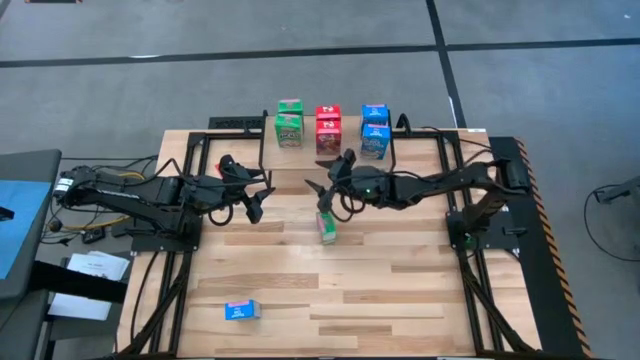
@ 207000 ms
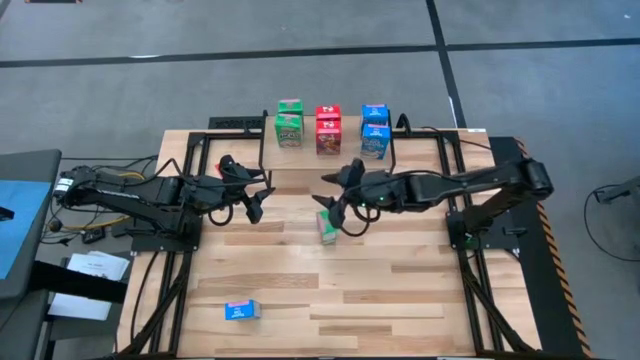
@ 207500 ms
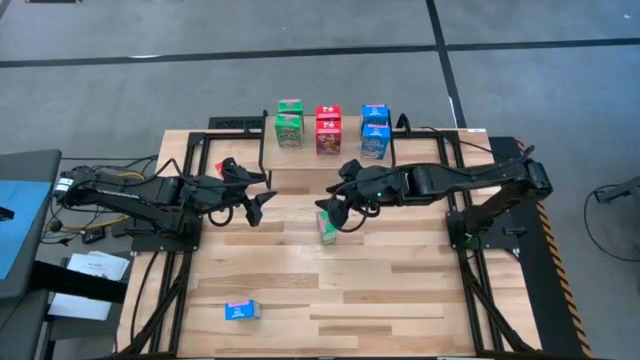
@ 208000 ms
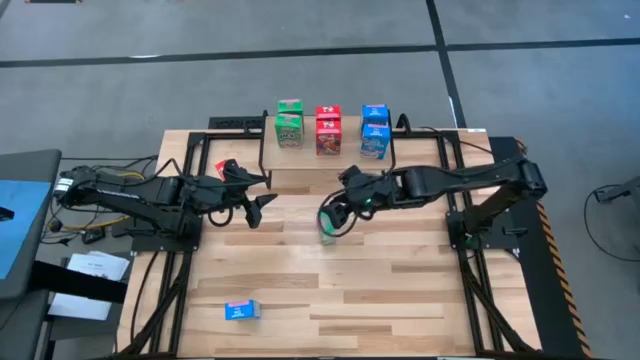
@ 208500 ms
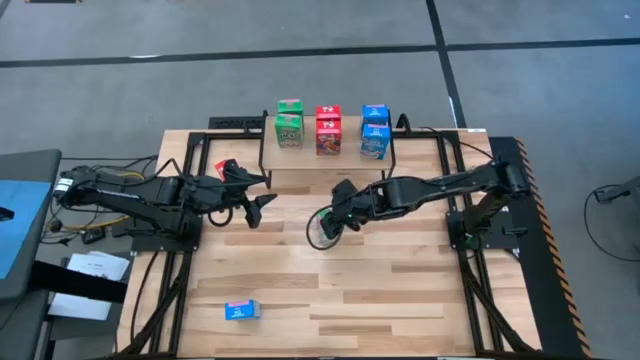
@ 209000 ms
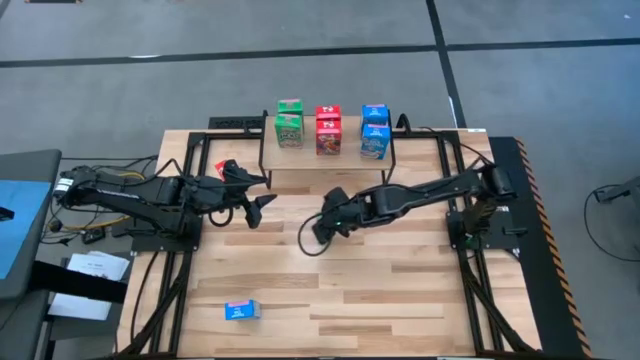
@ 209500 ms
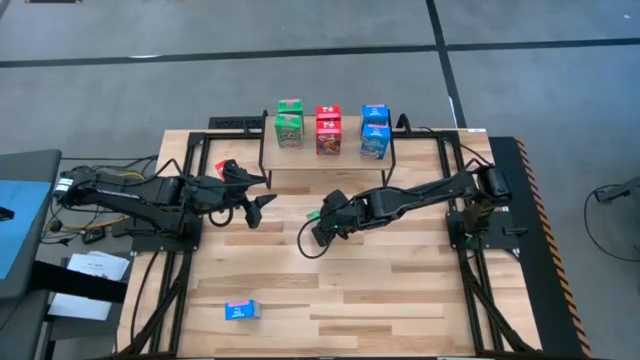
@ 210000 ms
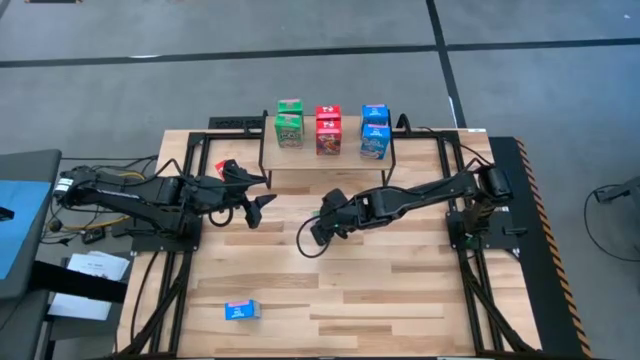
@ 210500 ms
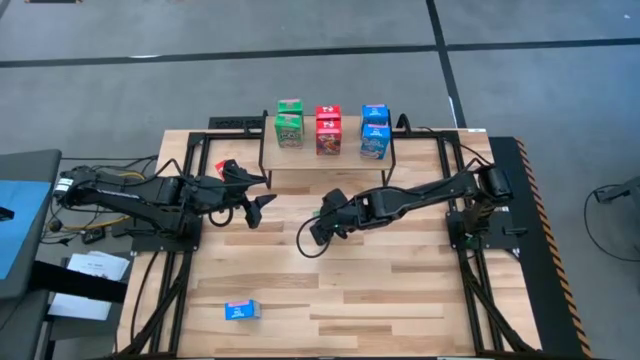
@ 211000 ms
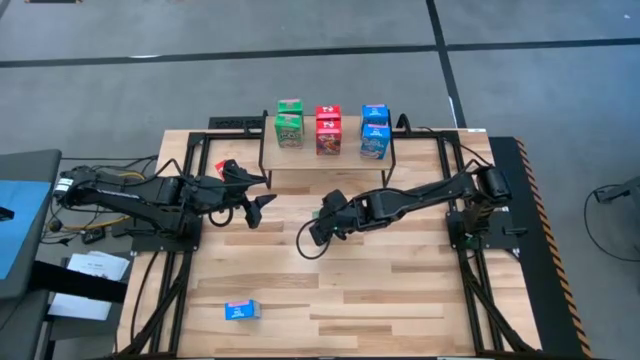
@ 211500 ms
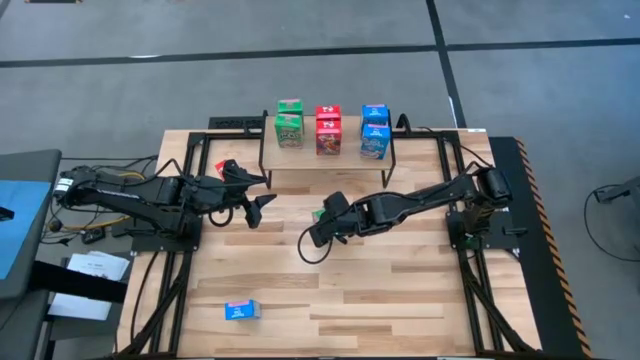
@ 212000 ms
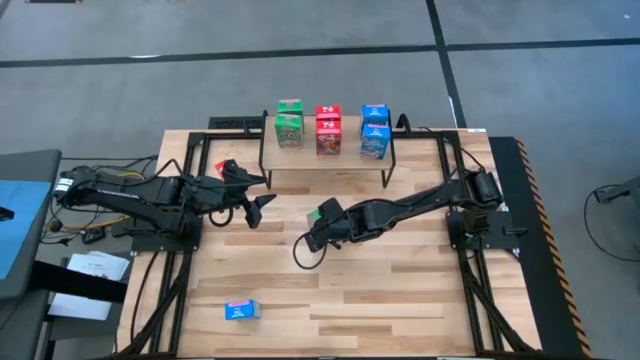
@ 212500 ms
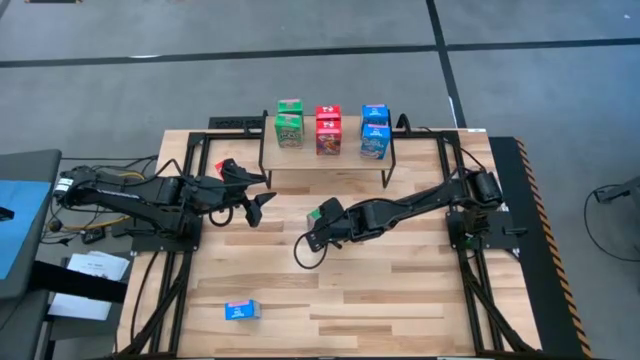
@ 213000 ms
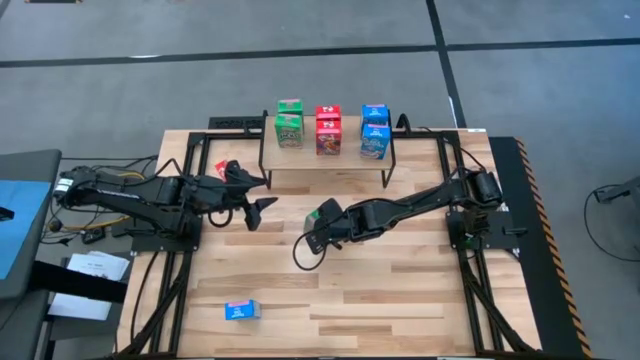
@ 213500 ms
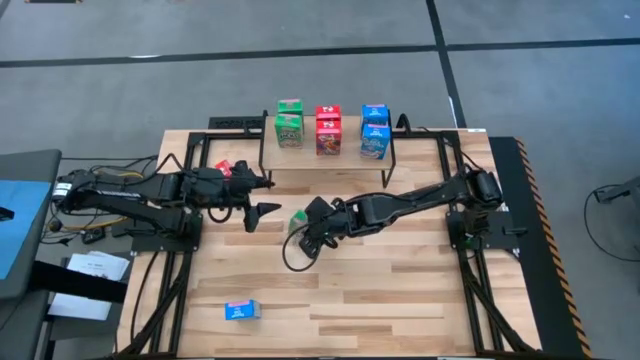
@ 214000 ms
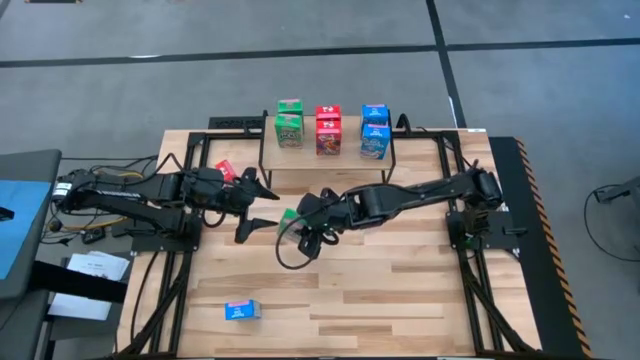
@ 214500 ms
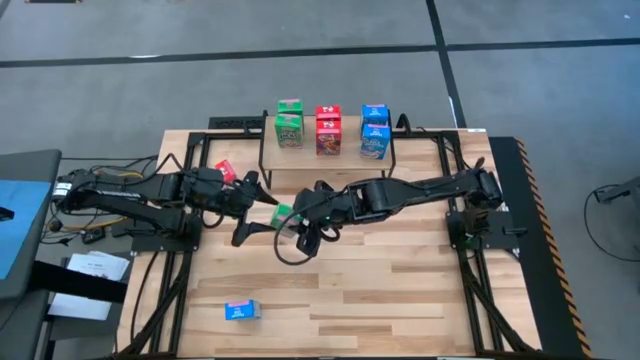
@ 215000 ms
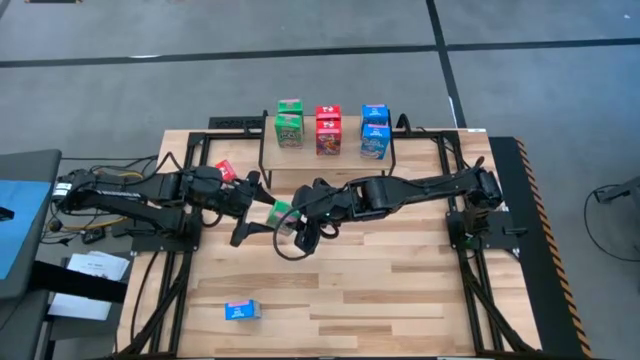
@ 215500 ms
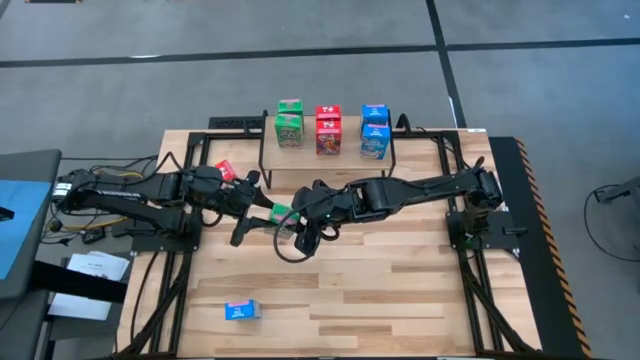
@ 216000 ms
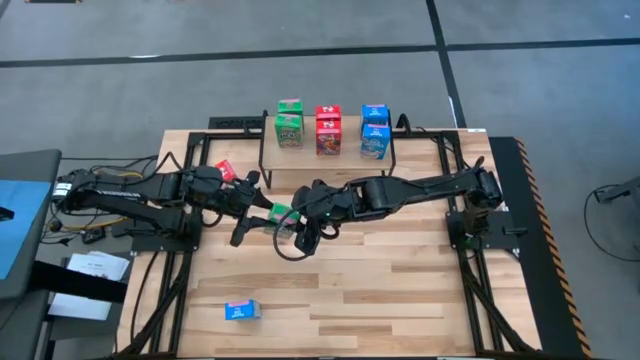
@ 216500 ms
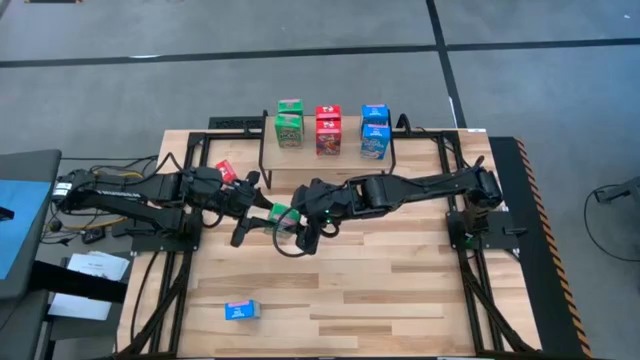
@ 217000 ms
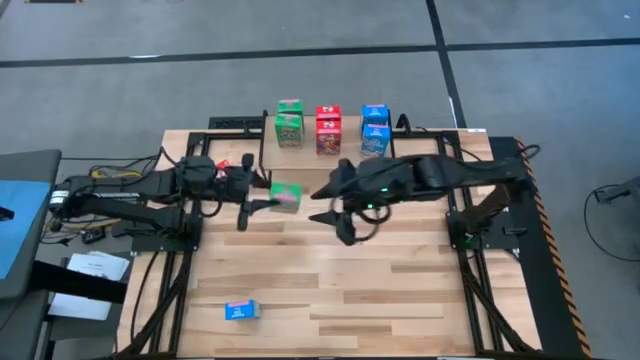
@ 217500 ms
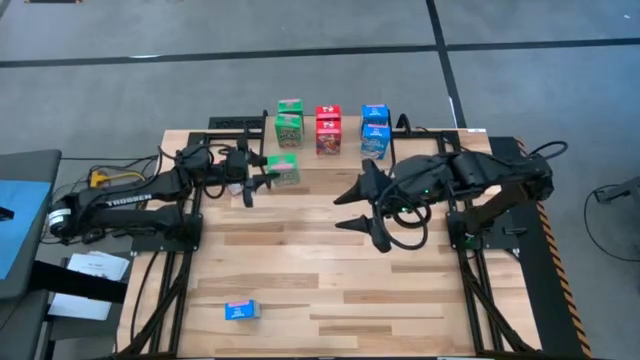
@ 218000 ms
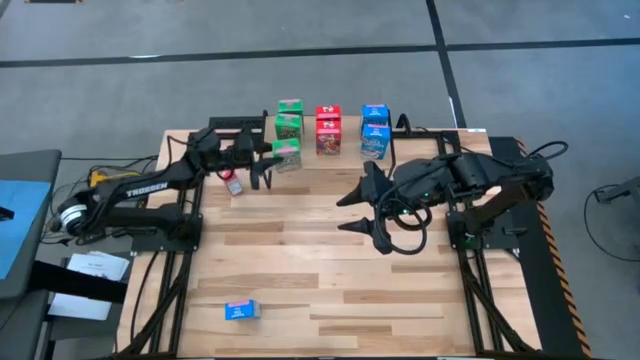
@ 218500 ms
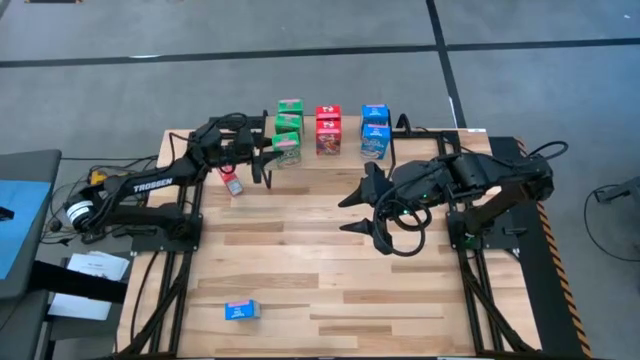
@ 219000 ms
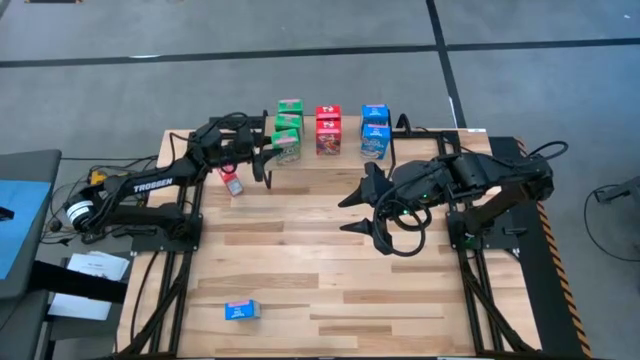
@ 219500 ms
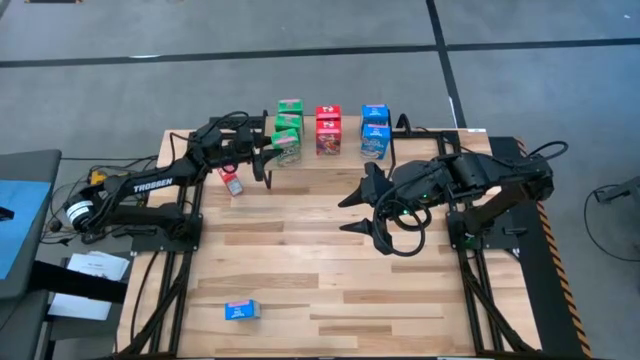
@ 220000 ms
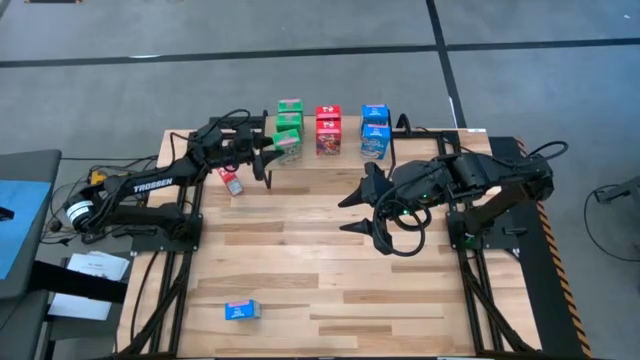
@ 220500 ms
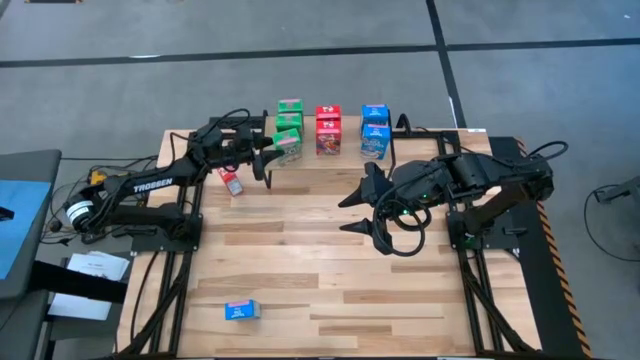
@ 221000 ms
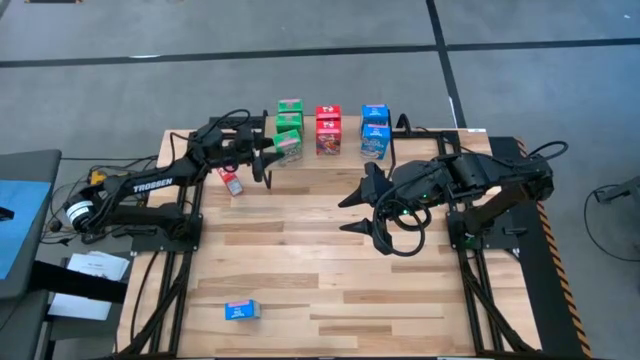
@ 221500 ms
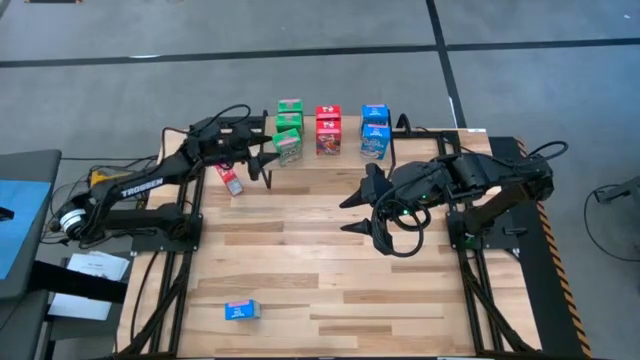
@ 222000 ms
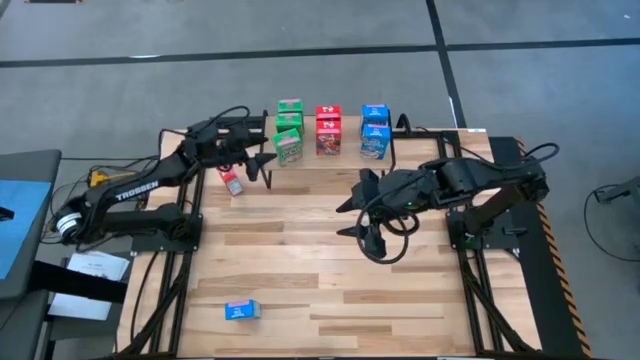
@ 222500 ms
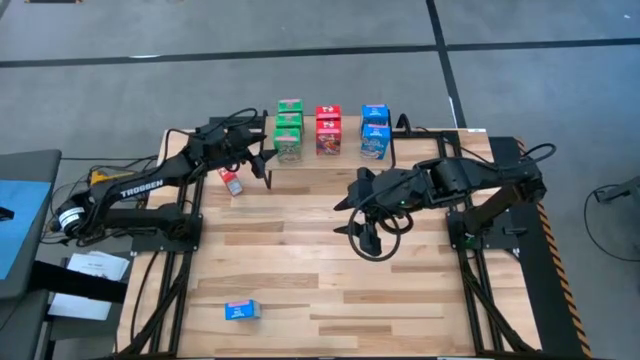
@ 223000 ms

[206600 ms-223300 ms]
Task: Stack cereal on shelf
Put the green cereal box on the shelf aligned with the other green cereal boxes

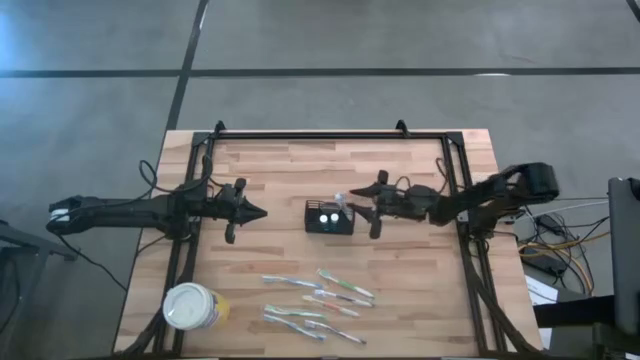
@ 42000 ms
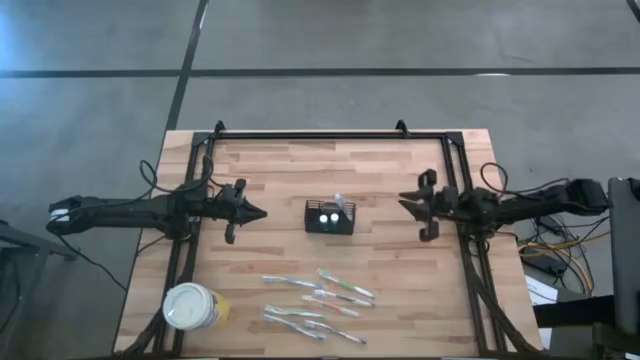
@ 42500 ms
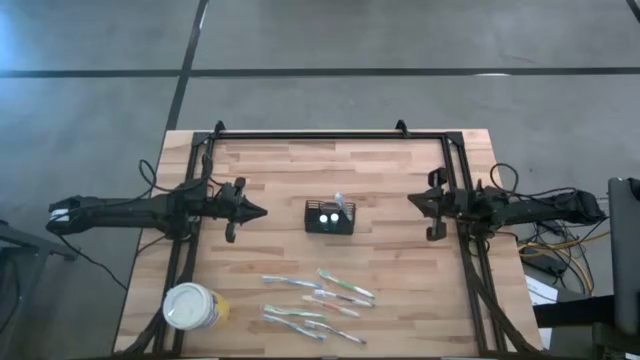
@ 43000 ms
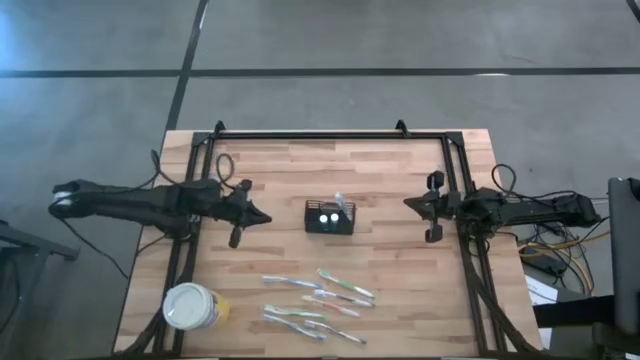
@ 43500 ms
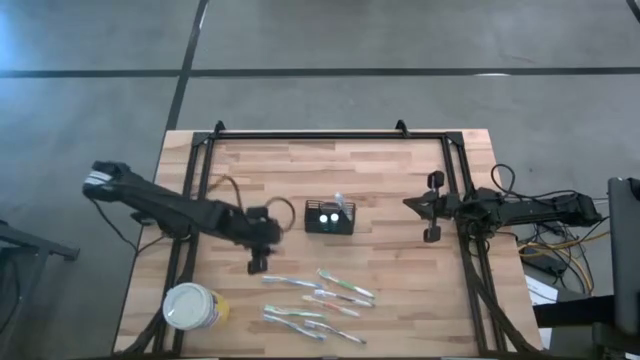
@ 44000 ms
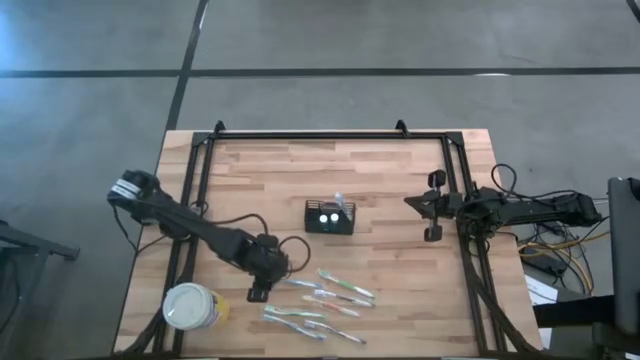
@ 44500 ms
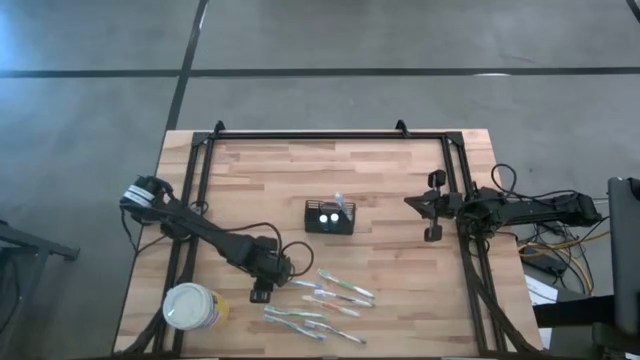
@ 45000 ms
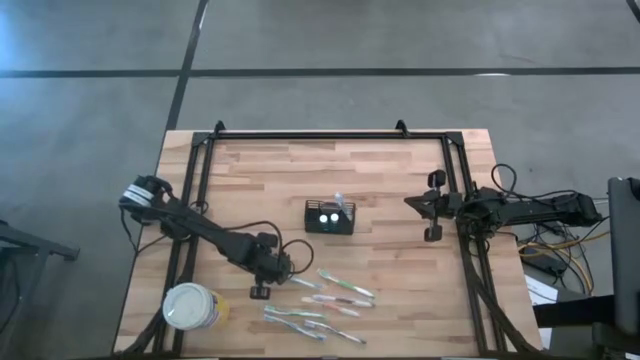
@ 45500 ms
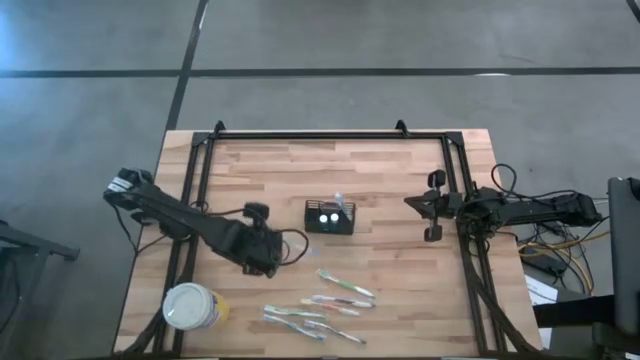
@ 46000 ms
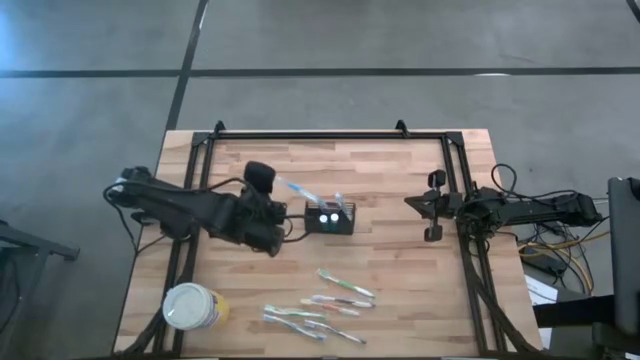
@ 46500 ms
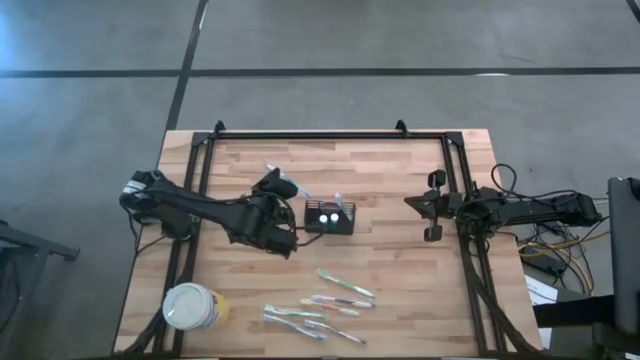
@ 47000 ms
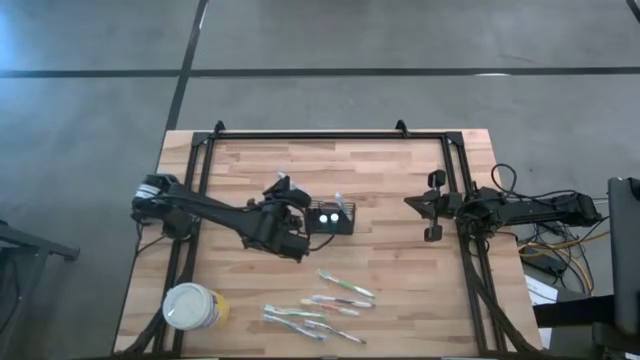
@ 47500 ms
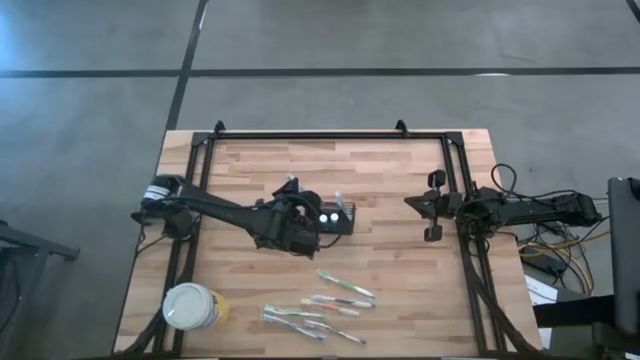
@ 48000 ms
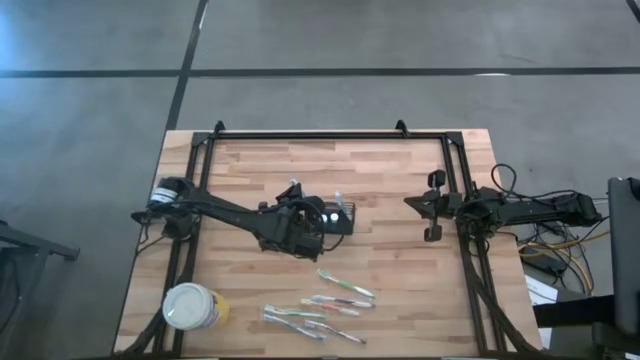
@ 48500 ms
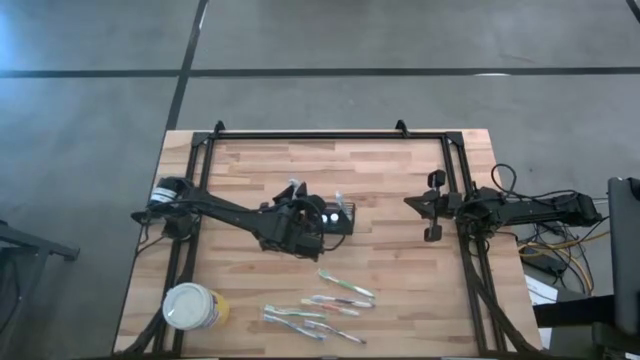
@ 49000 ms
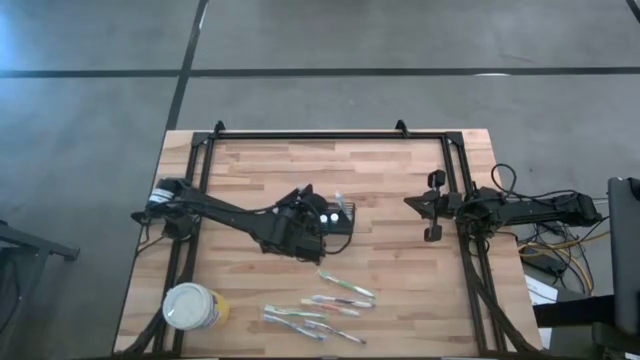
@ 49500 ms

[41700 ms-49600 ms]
Task: Pick & Place toothbrushing station
Put the top blue toothbrush into the wire organizer
